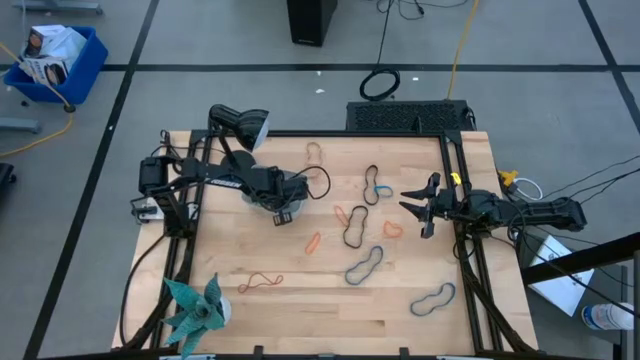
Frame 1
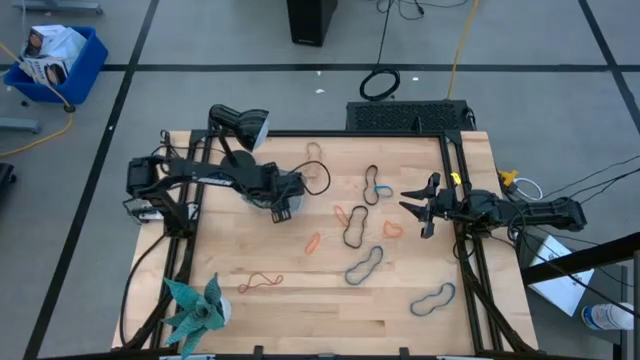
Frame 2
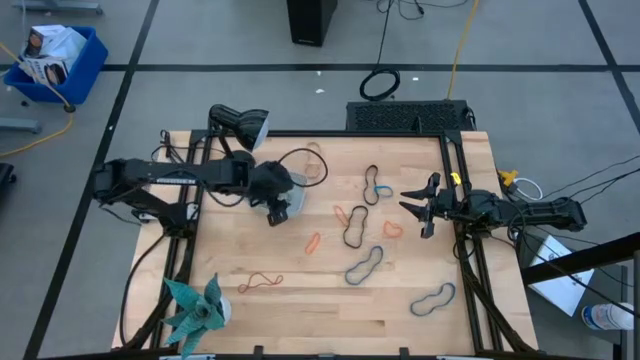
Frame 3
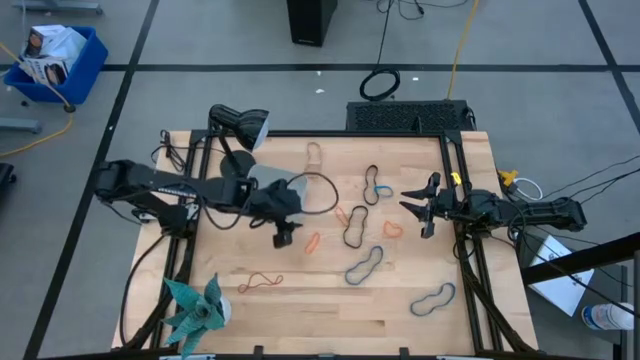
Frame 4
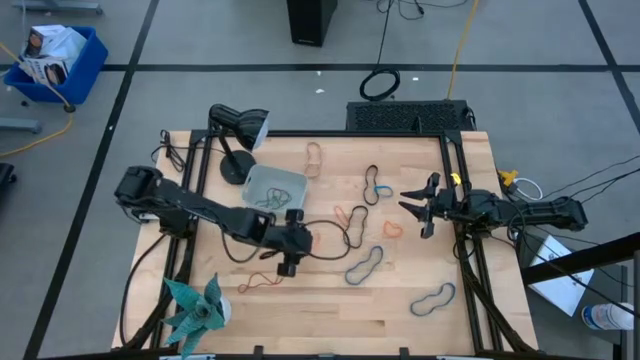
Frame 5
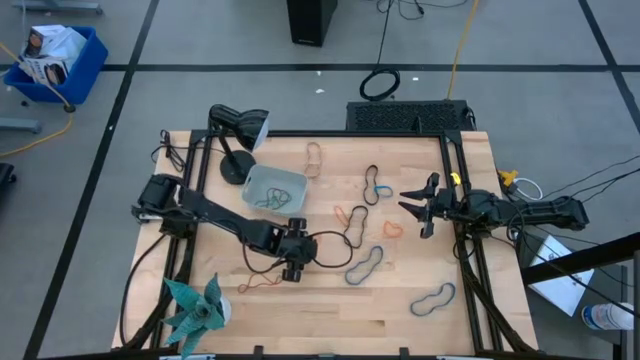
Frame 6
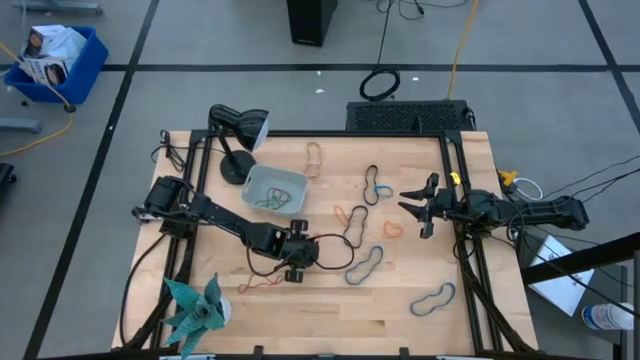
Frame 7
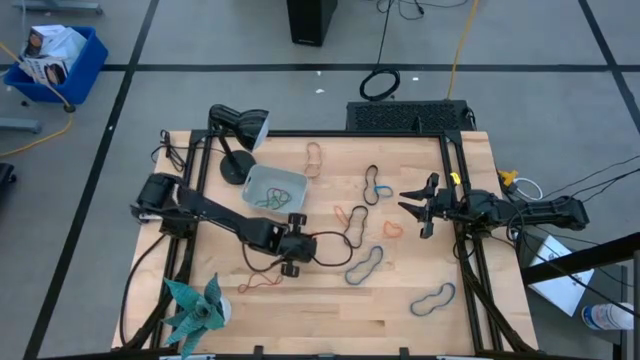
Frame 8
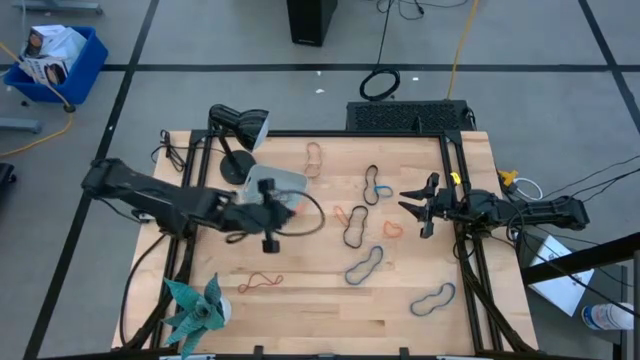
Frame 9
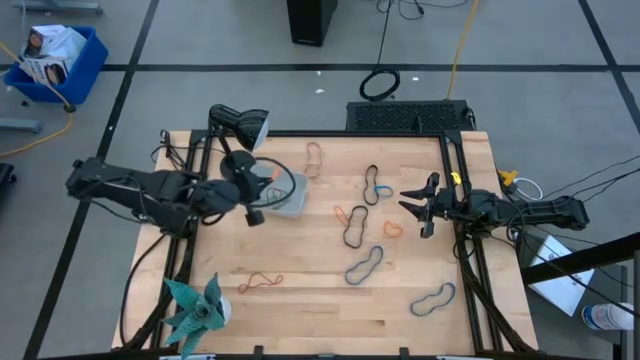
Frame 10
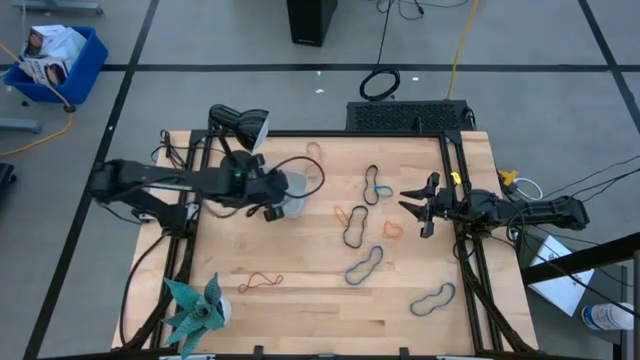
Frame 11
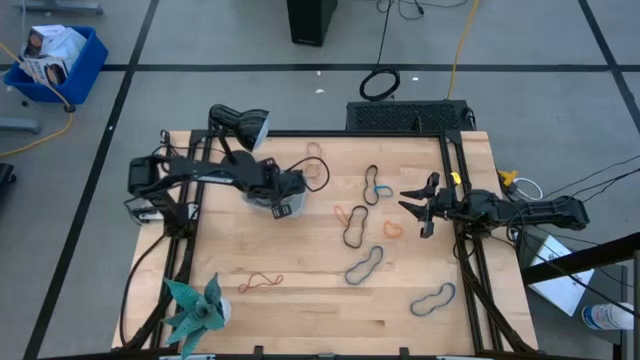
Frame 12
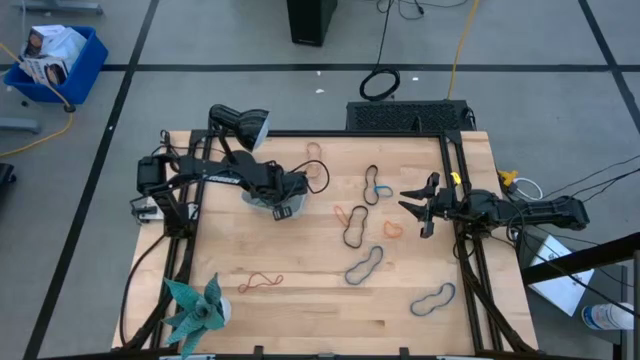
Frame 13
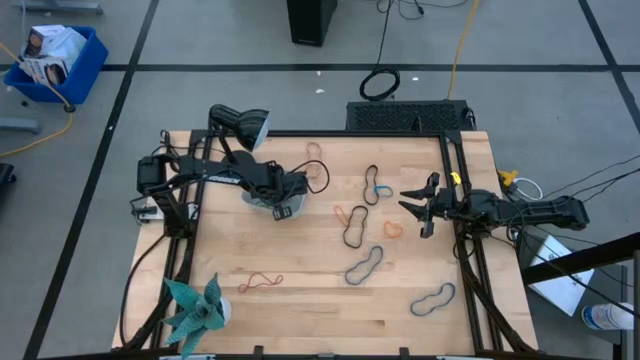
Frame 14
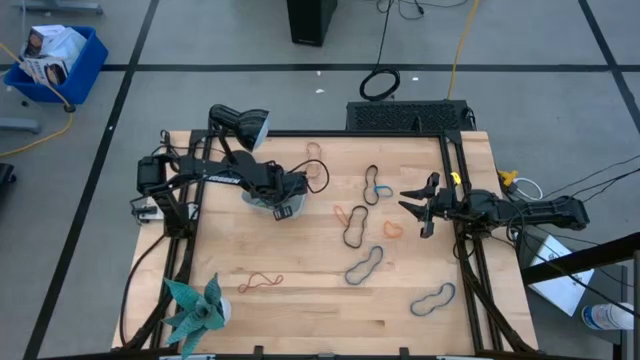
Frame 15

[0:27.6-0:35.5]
Task: Pick and place rubber bands into bin
Put the bottom left orange rubber band into the gray bin

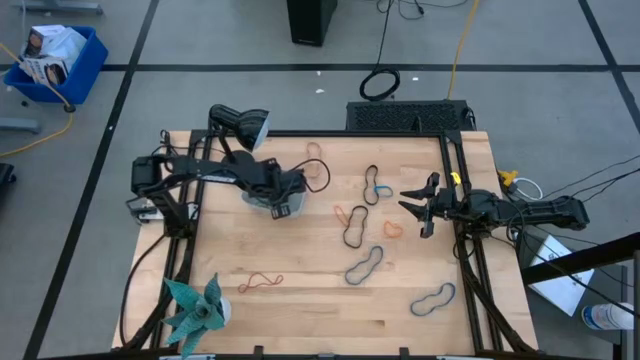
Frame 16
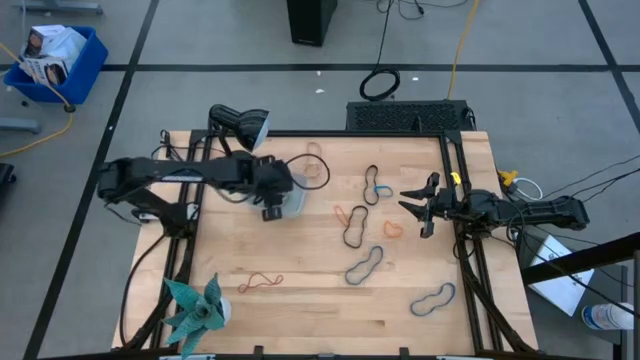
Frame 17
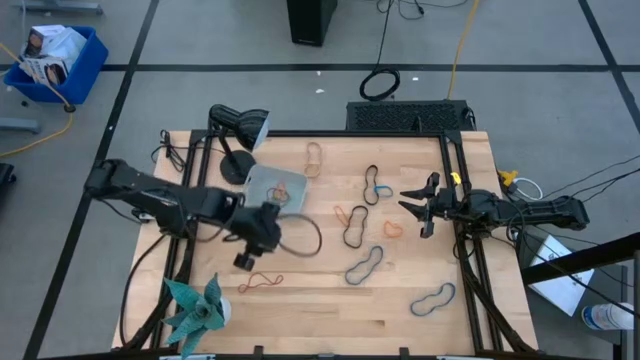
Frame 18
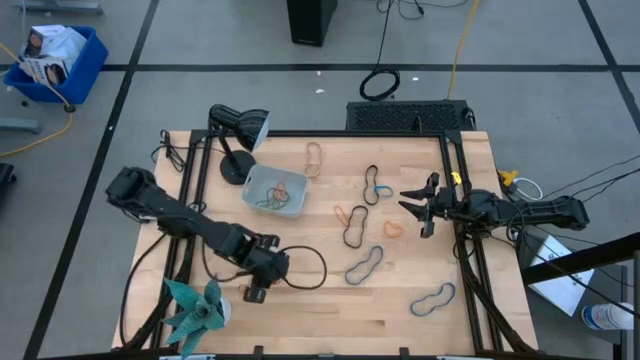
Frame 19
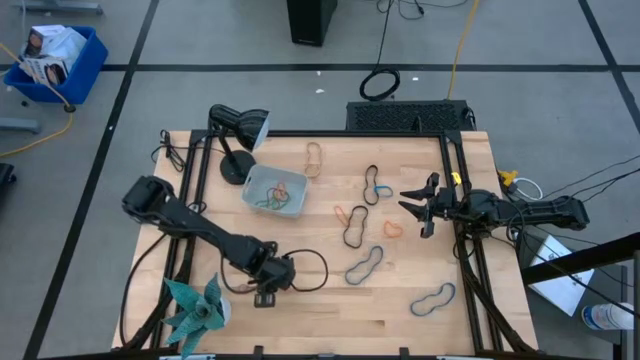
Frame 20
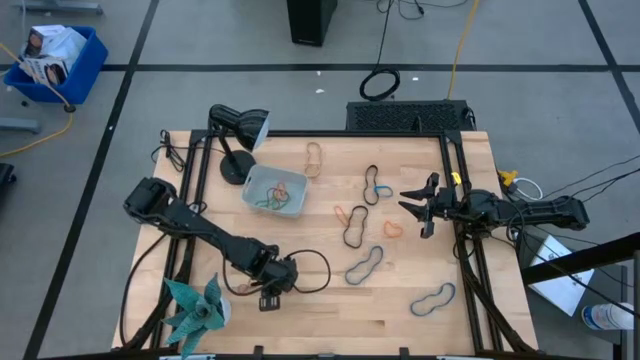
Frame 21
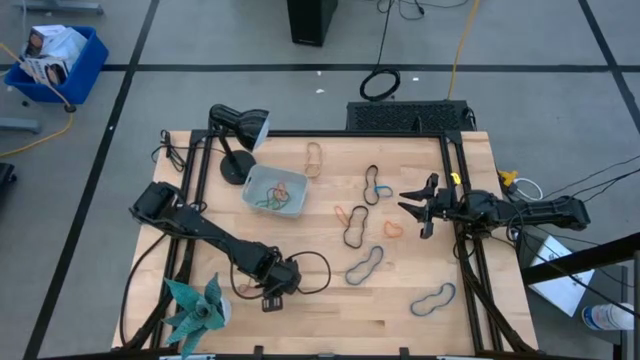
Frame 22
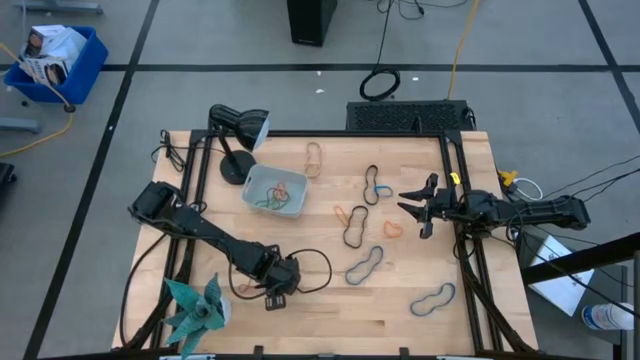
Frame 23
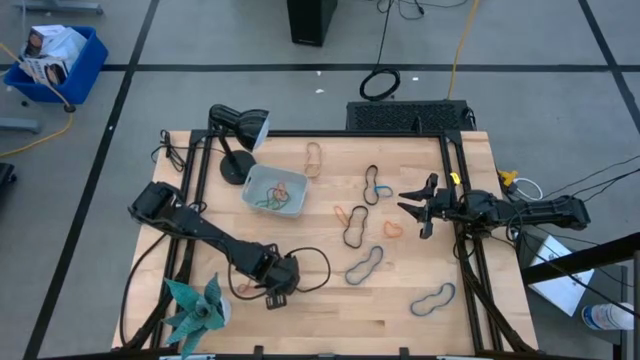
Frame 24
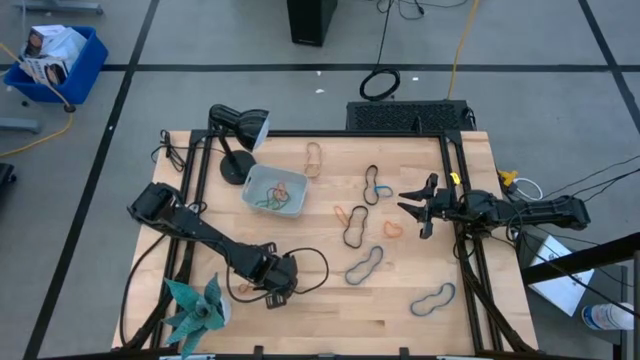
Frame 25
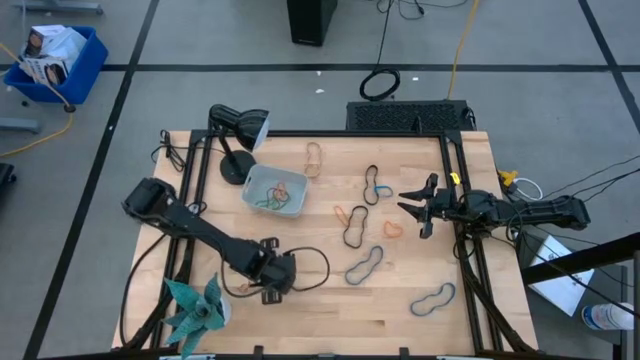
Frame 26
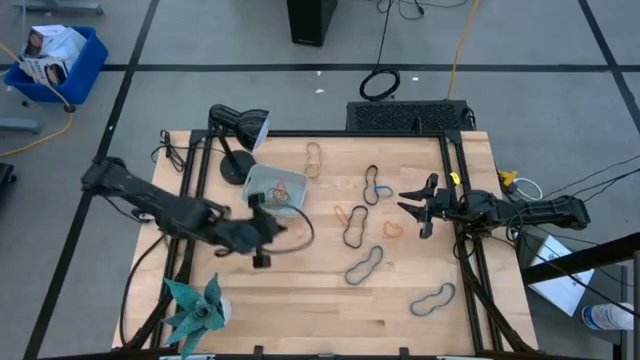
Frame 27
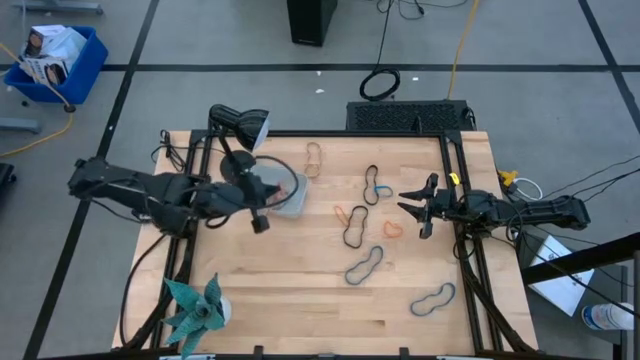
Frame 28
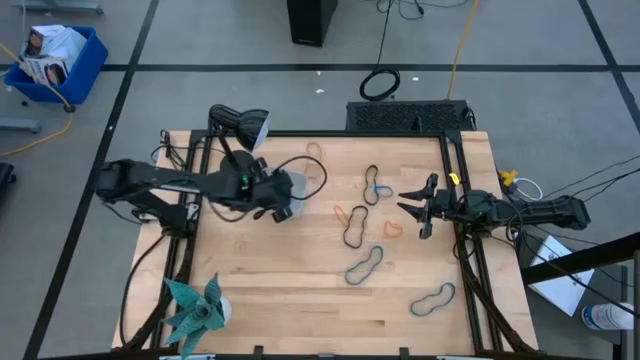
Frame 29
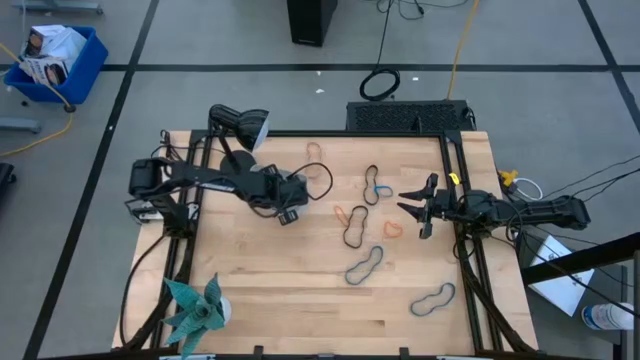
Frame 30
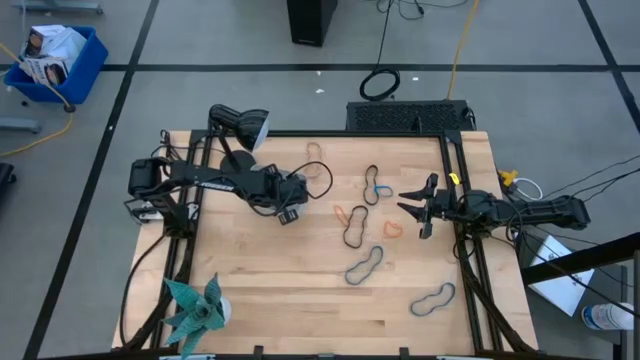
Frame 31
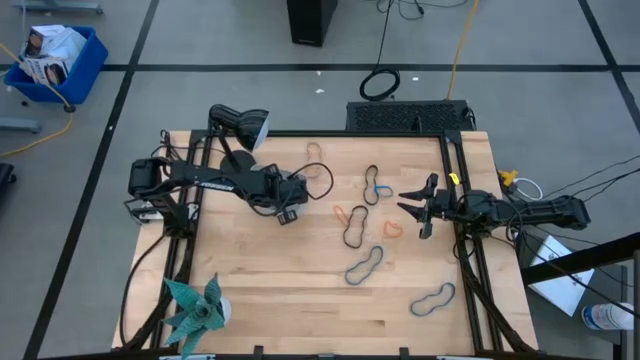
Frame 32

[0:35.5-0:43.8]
Put the red rubber band into the gray bin

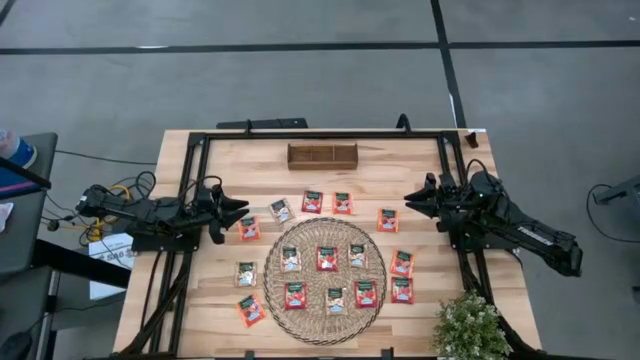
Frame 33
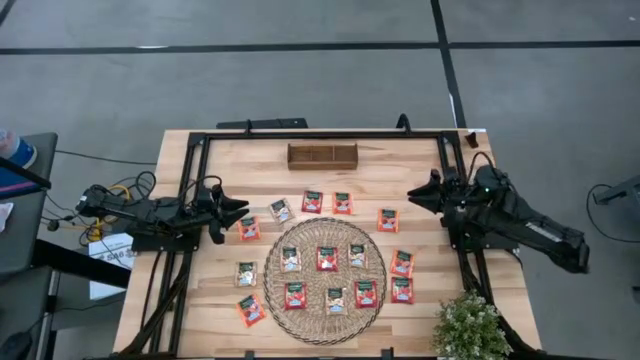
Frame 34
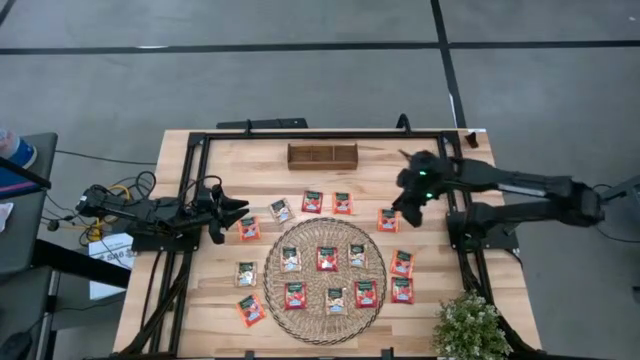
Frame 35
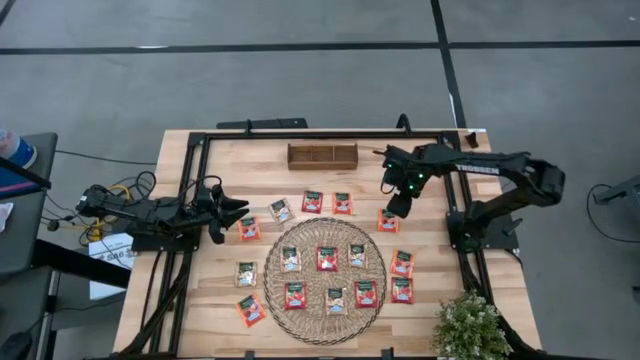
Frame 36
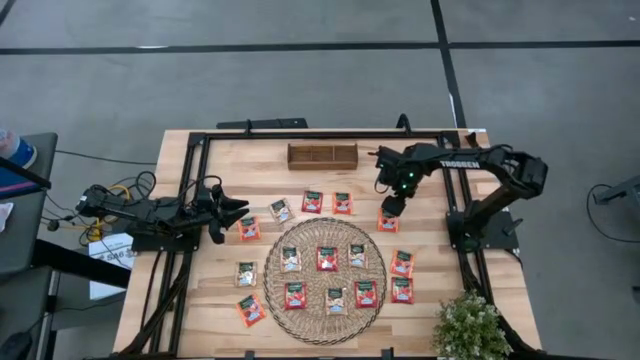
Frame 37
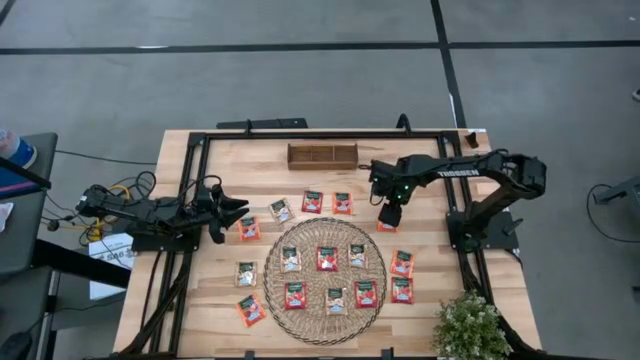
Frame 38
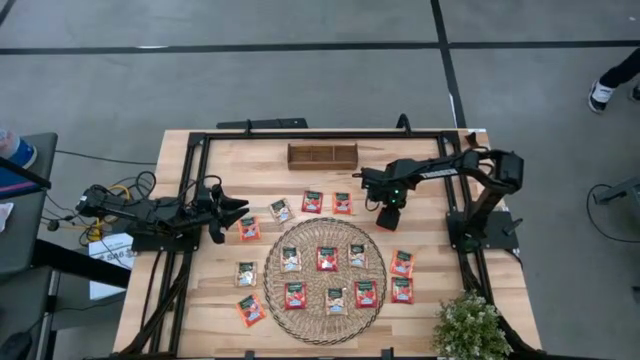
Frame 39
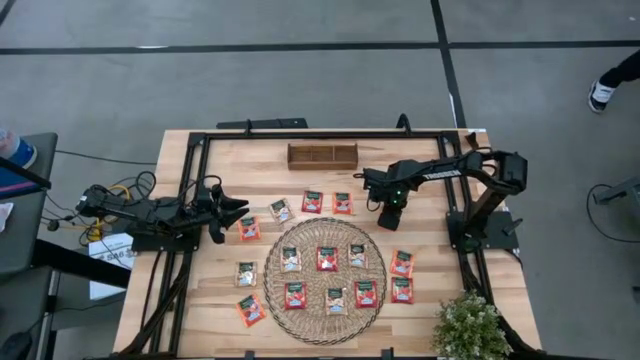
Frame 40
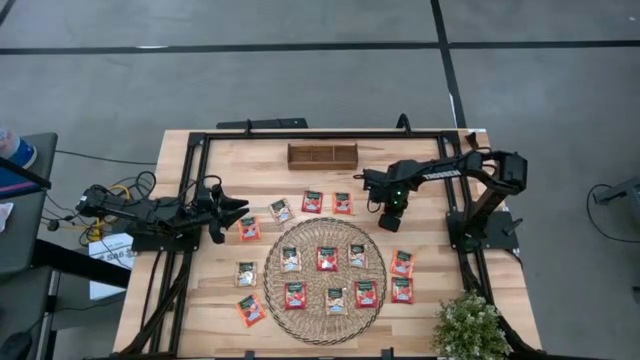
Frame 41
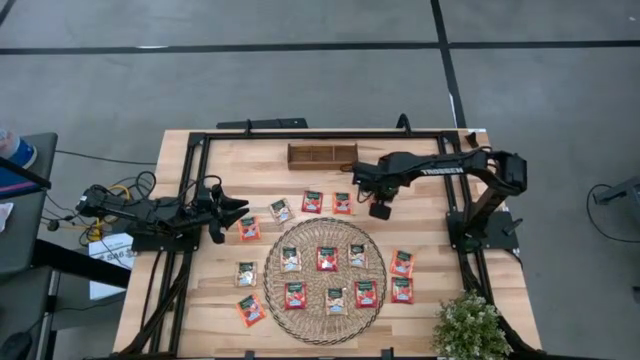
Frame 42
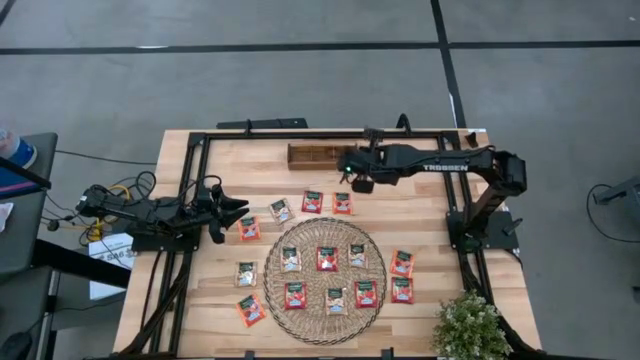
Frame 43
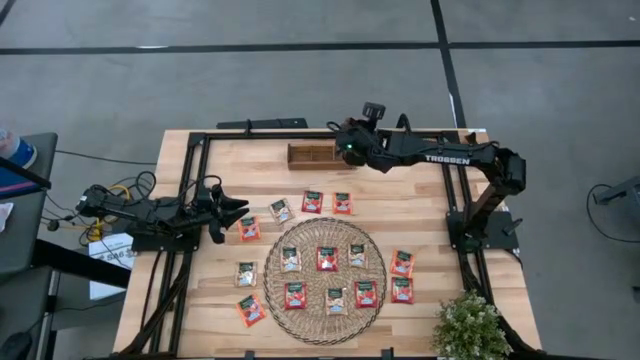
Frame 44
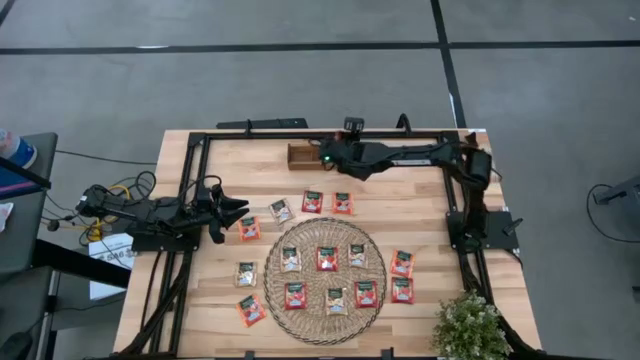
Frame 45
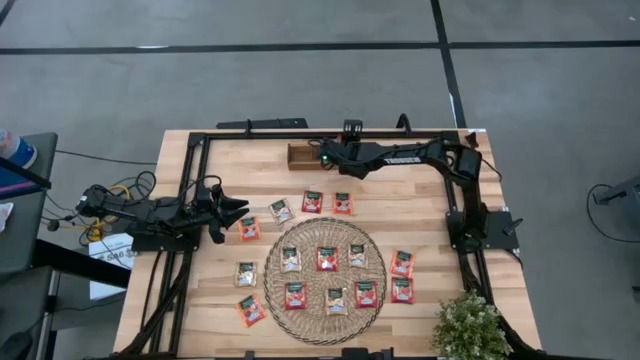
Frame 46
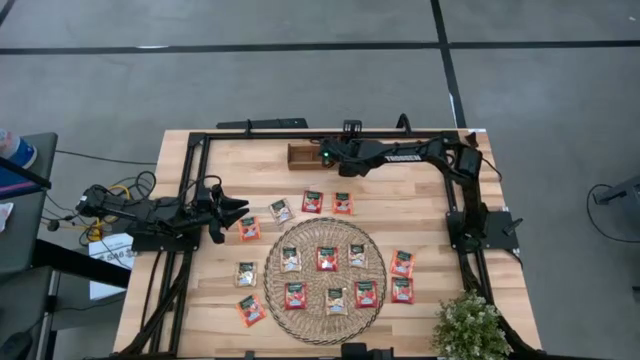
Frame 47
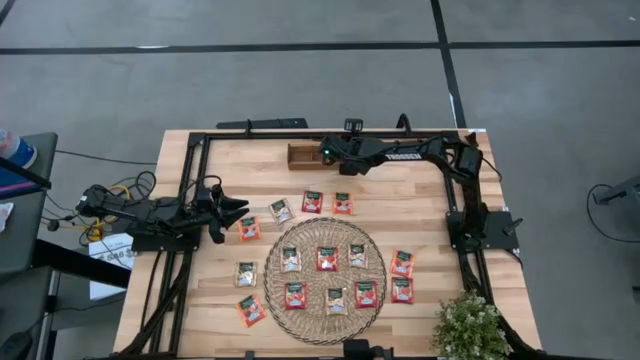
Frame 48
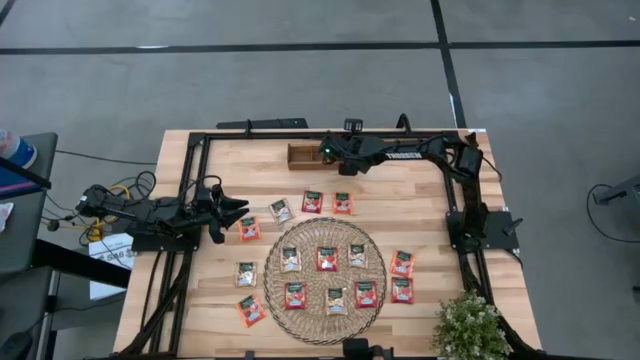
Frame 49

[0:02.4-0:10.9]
Task: Pick & Place Tea
Put the orange tea bag into the right section of the wooden organizer
